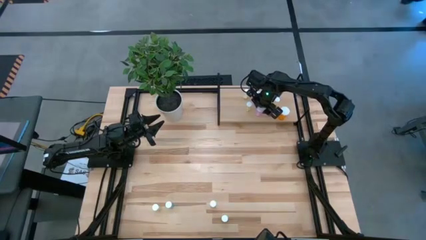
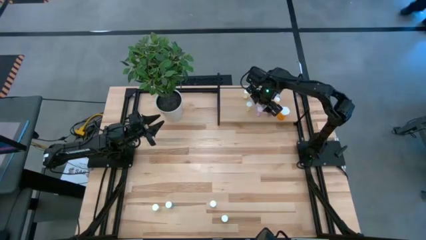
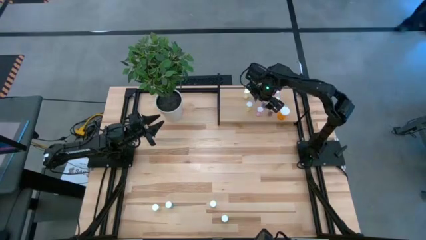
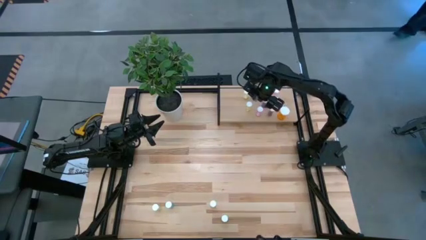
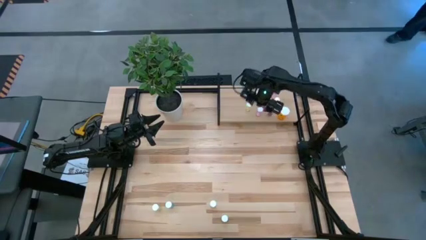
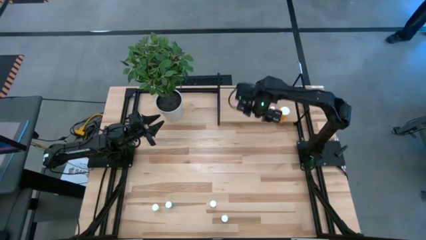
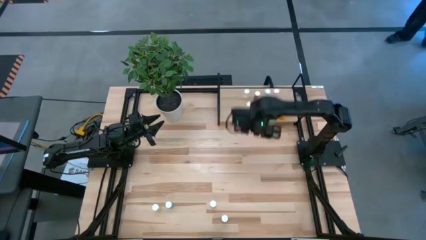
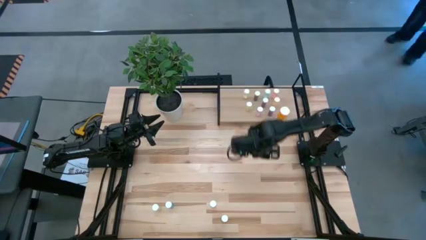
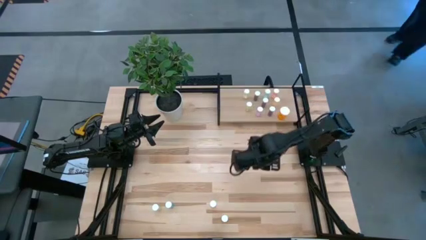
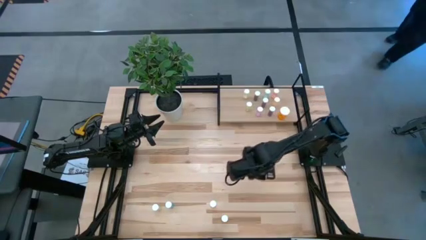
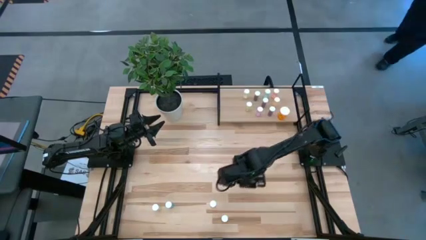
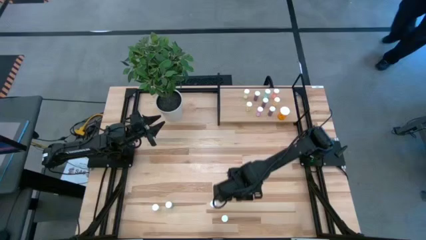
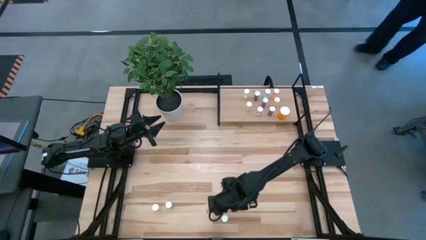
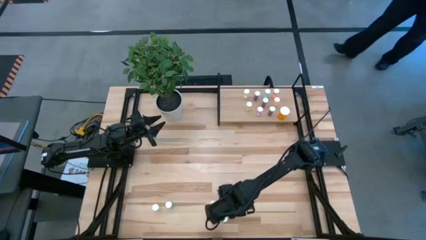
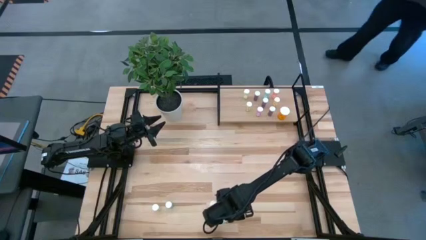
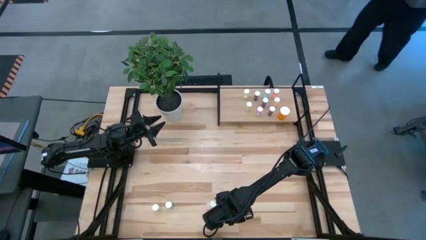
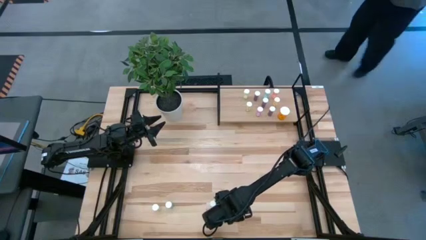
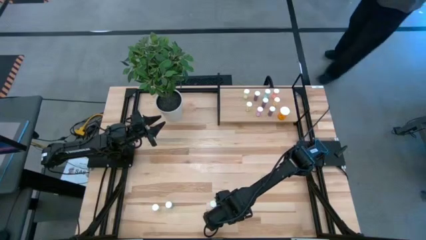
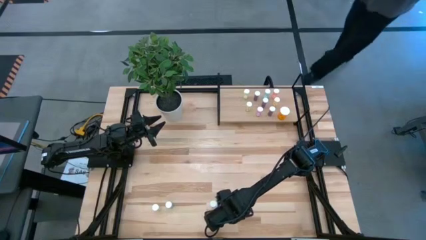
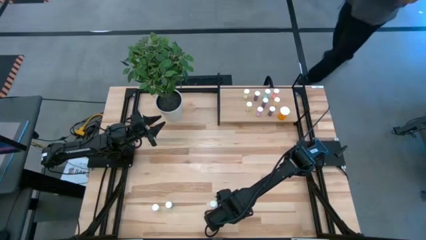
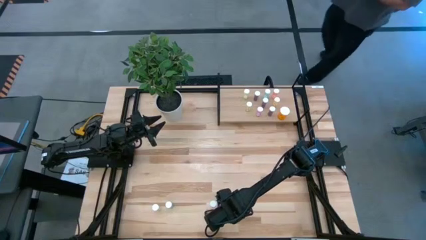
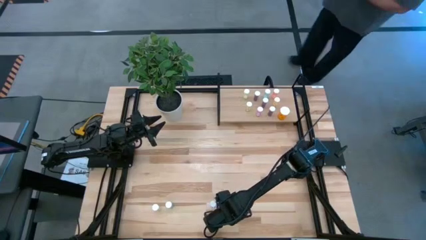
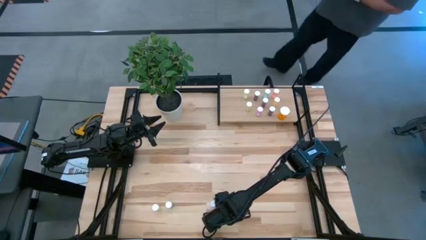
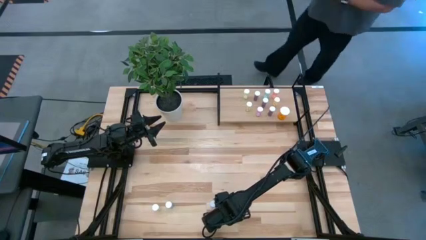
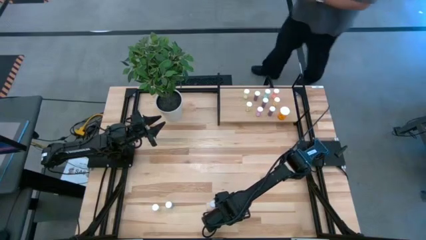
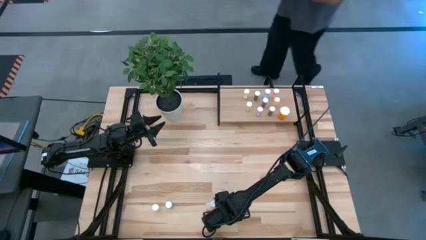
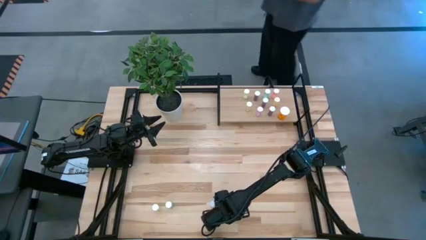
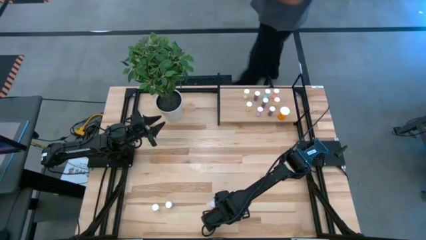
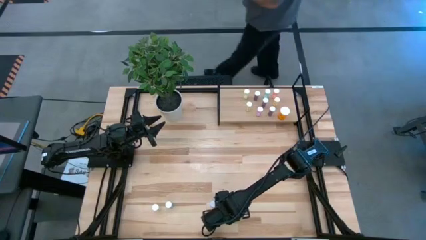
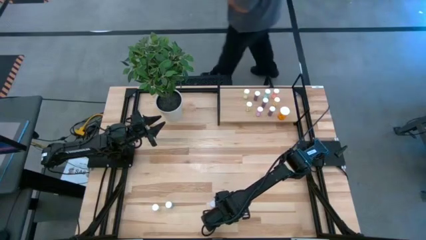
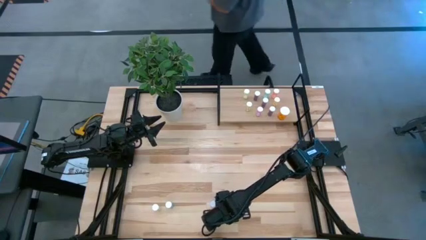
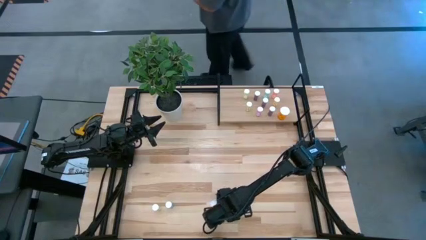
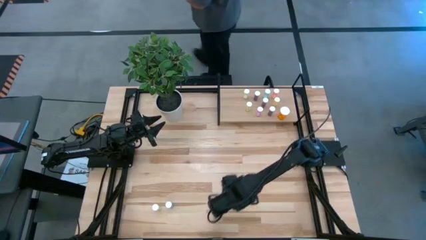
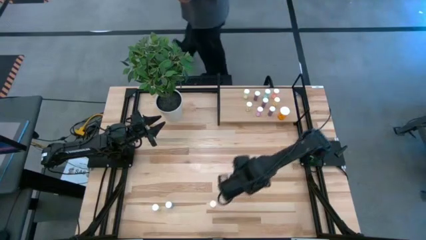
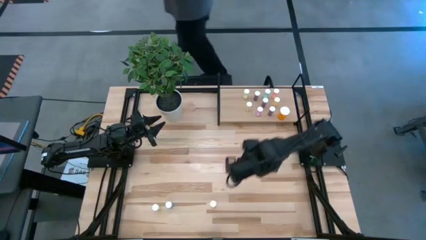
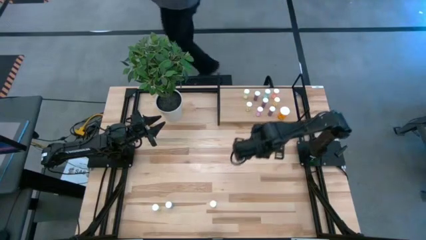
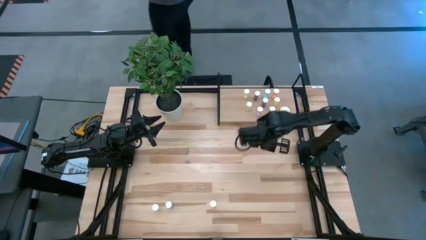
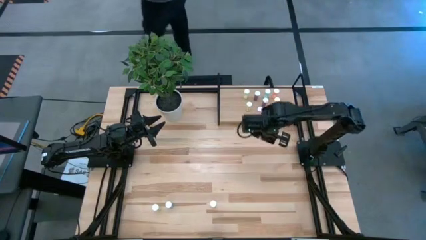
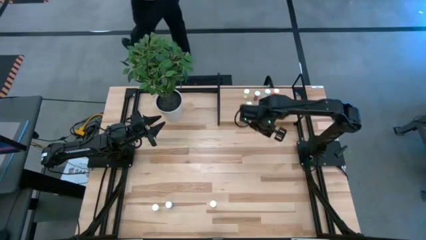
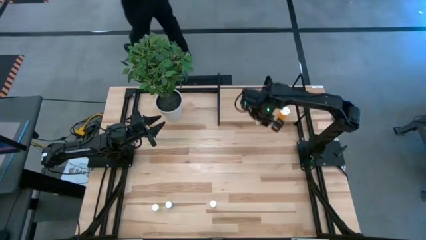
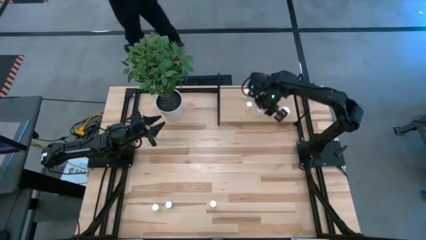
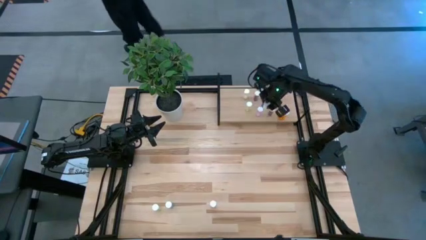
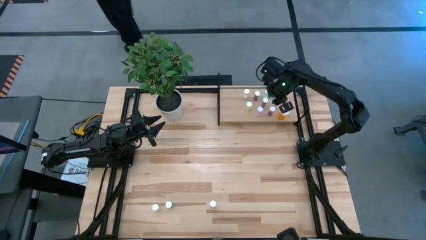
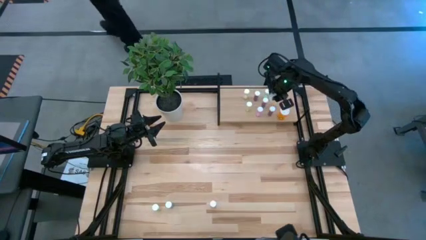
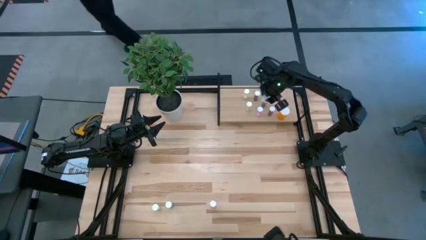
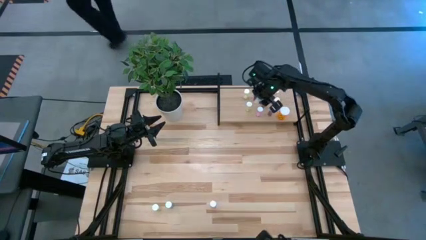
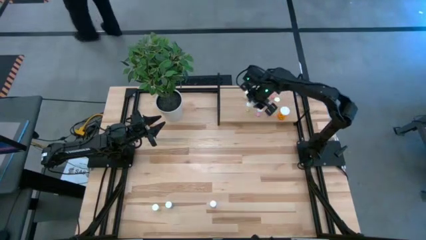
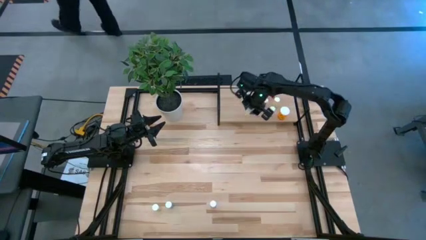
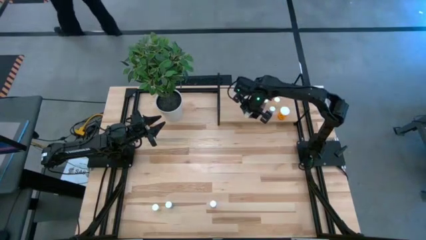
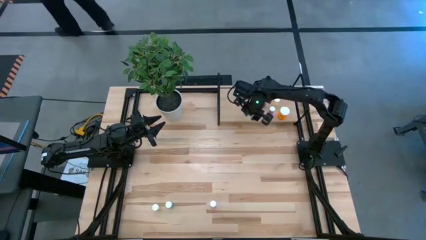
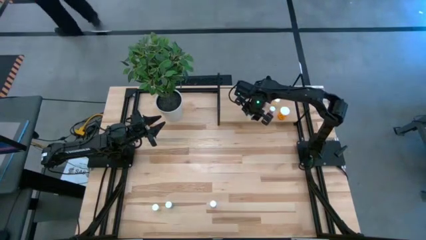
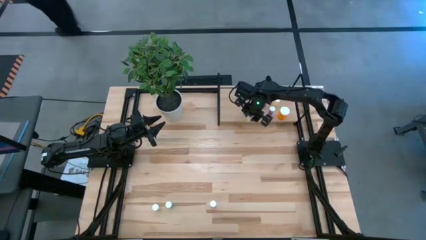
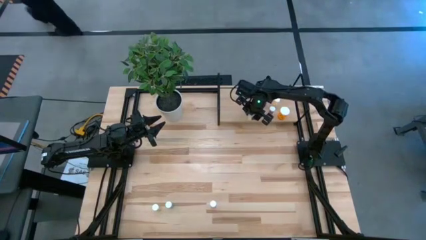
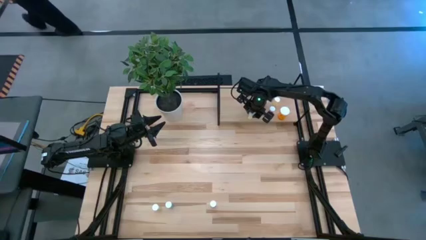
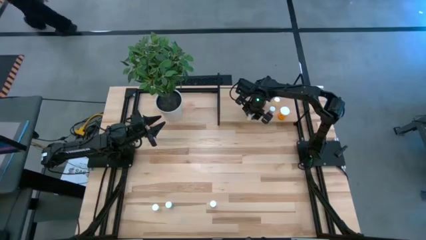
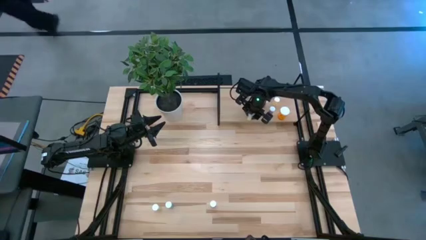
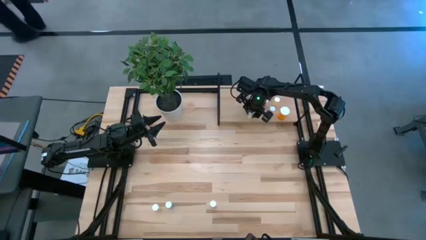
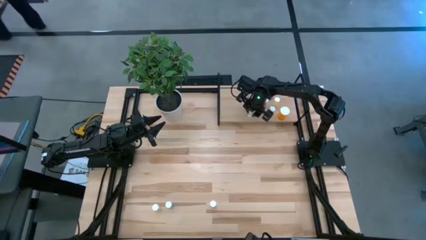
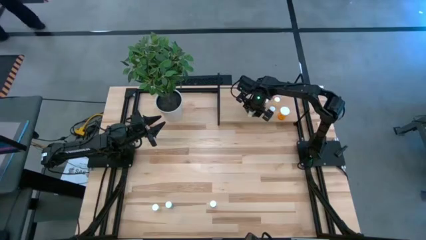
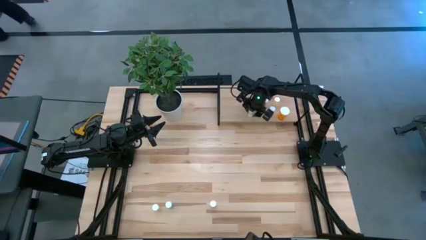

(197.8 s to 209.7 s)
Task: Pick and place medicine bottles onto shelf by color
Put the right yellow pill bottle on the shelf

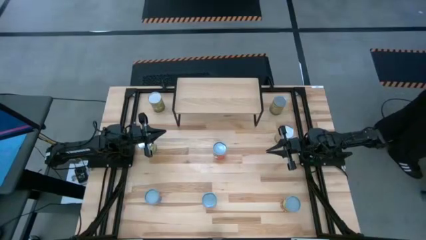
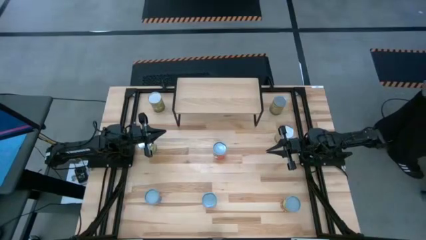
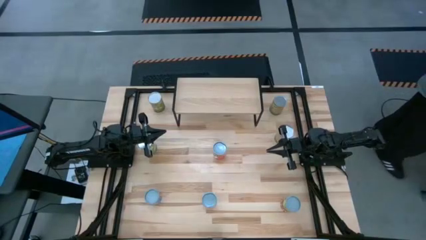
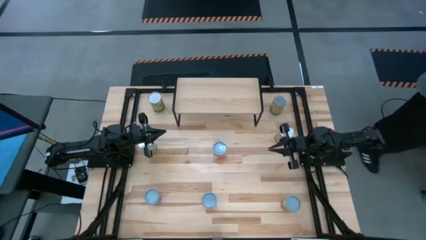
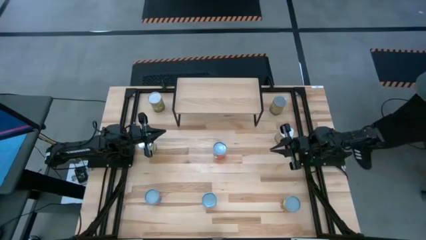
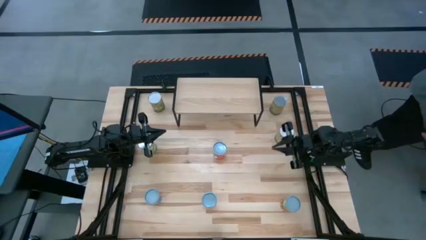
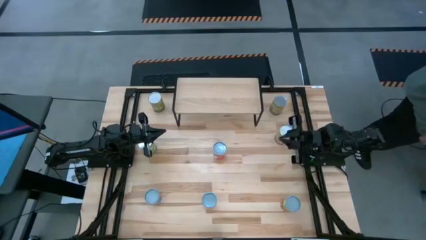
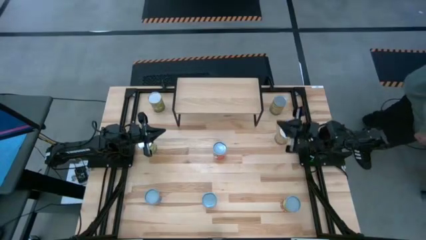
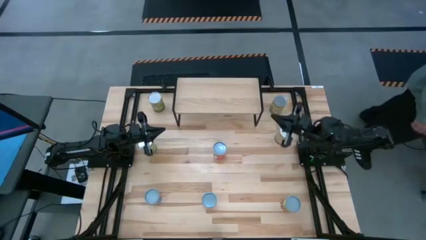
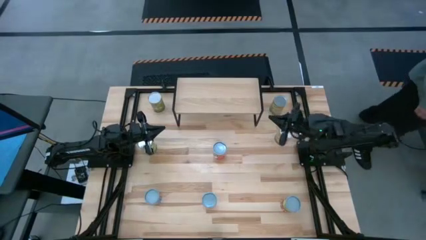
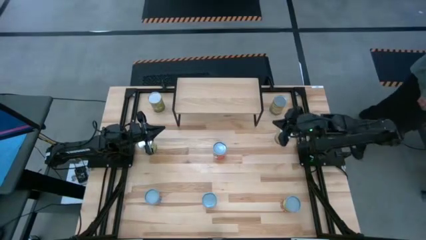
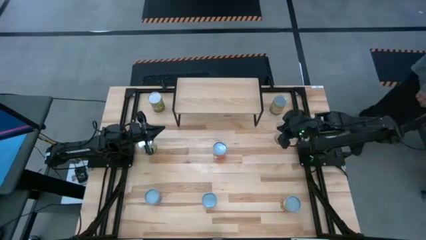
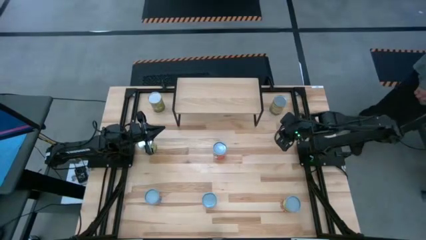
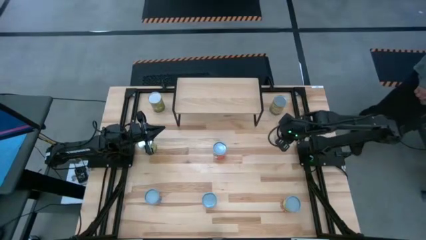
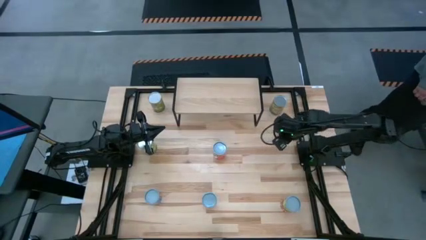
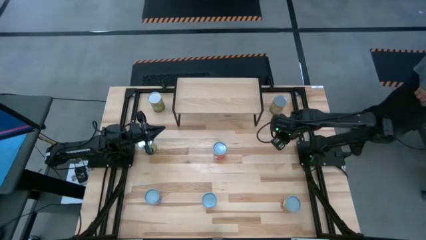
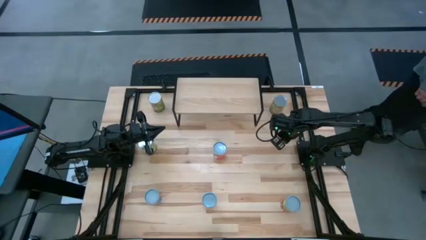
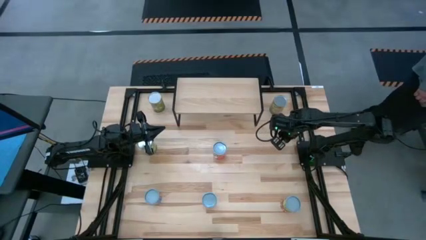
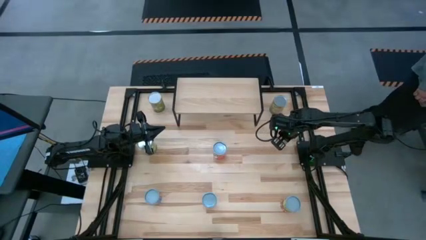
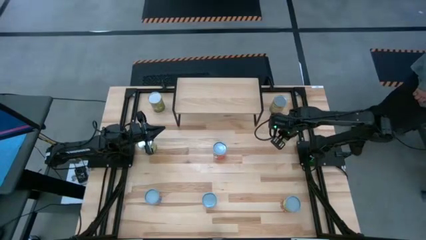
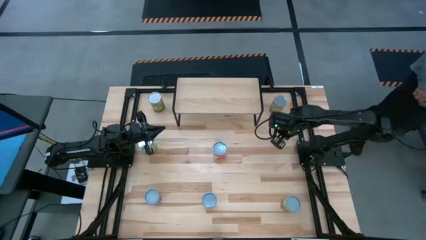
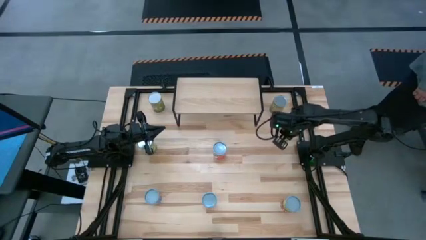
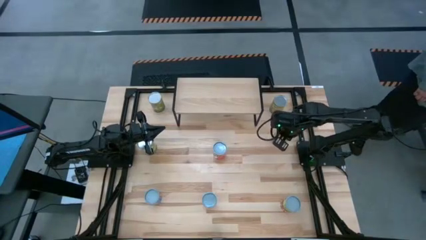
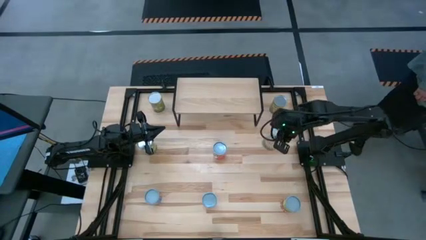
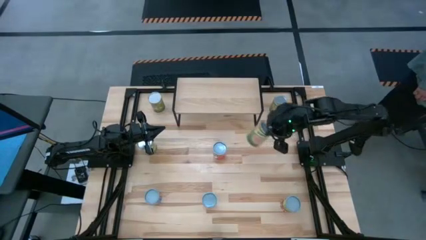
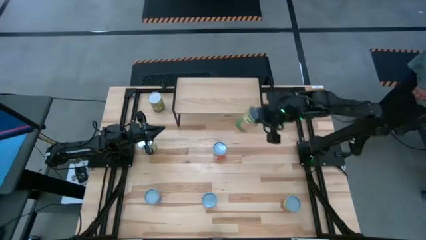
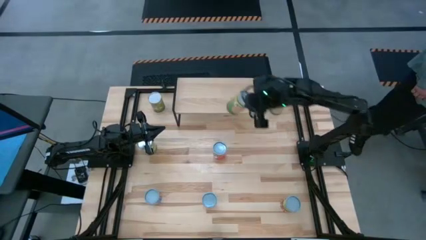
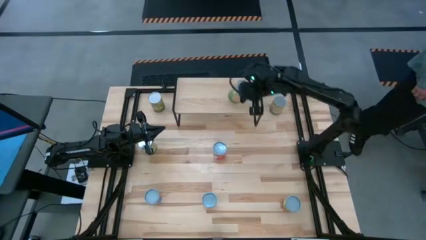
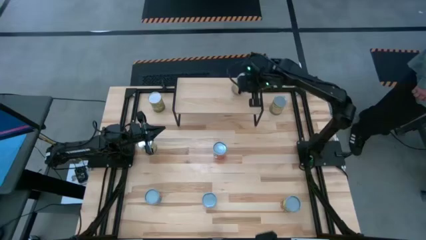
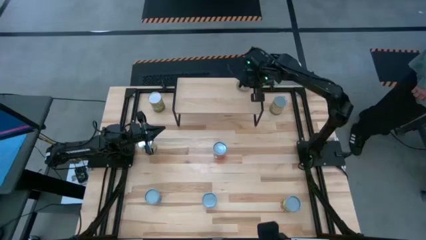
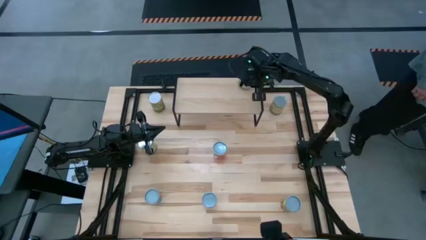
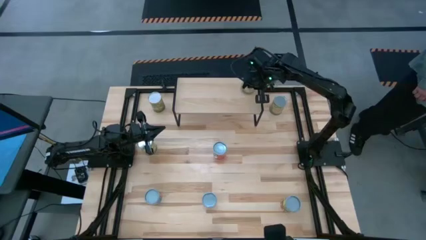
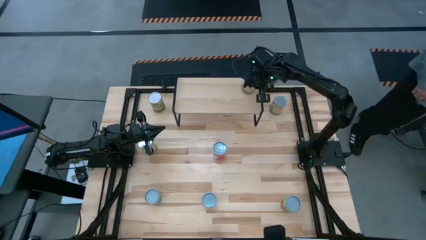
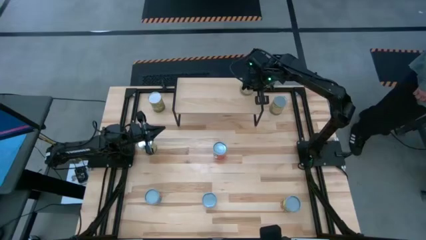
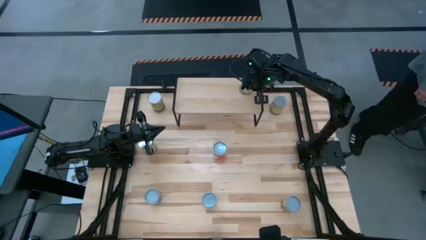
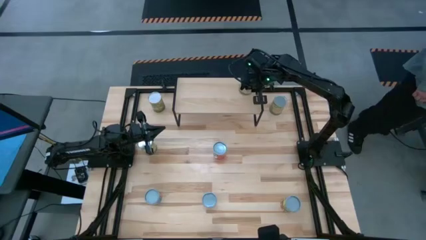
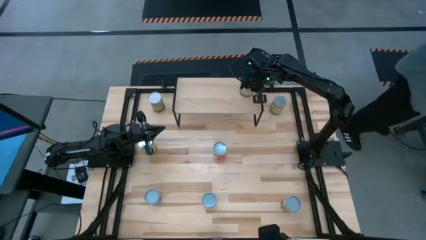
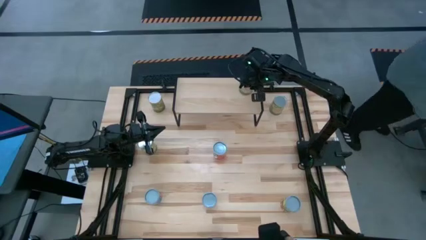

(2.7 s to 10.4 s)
Task: Pick and place cans onto a shelf
Put the bottom canned oranges on the shelf
